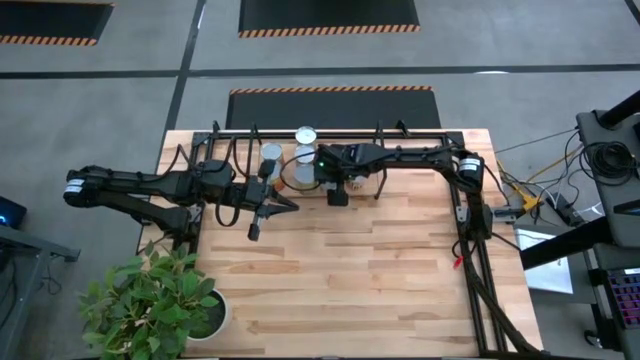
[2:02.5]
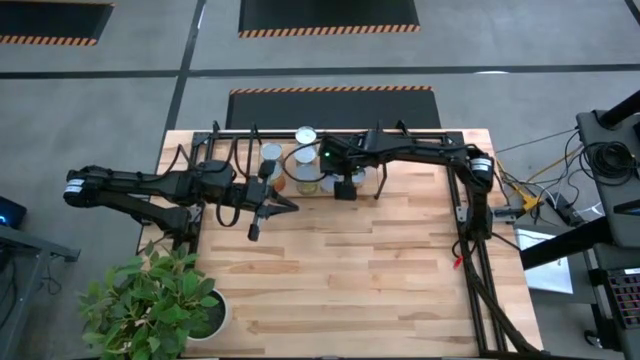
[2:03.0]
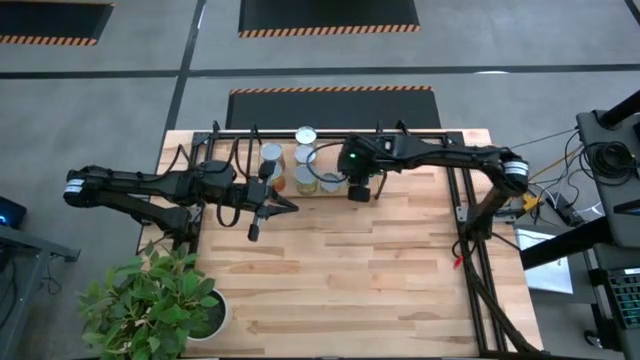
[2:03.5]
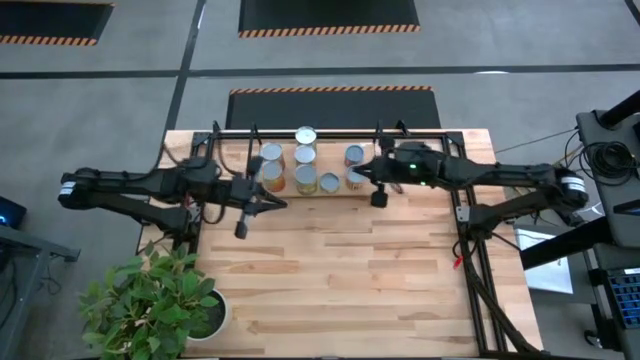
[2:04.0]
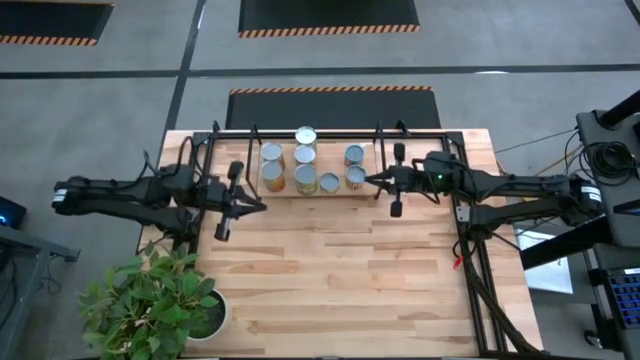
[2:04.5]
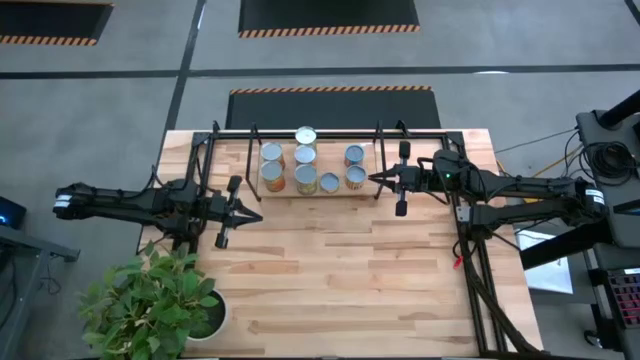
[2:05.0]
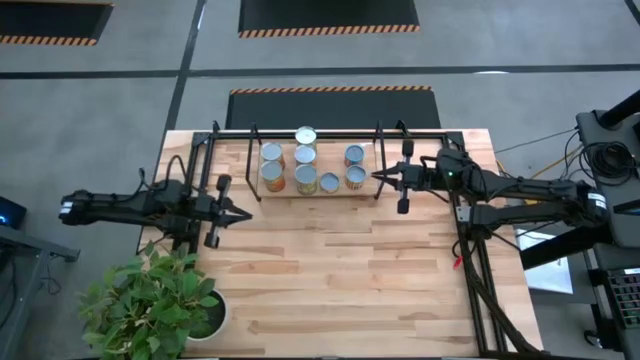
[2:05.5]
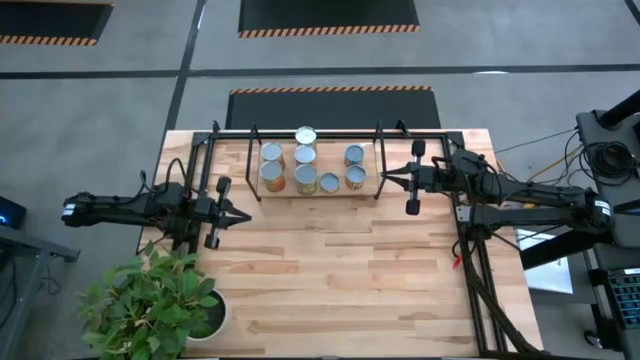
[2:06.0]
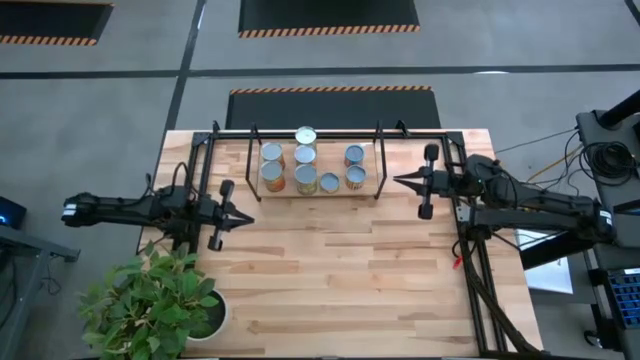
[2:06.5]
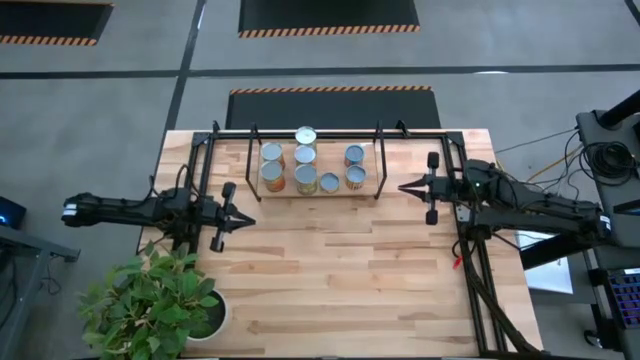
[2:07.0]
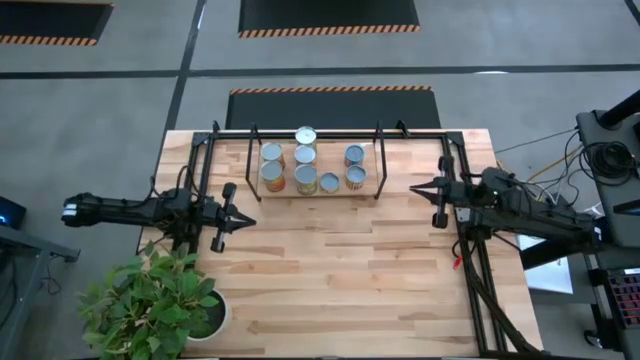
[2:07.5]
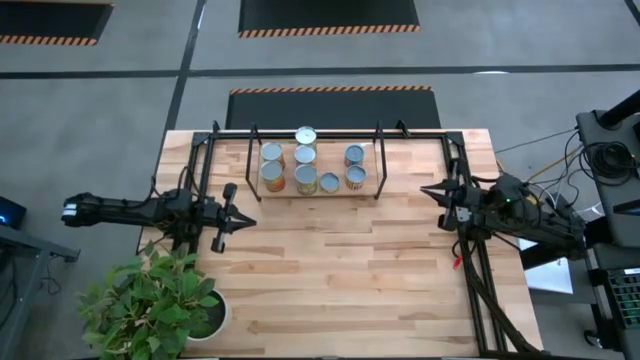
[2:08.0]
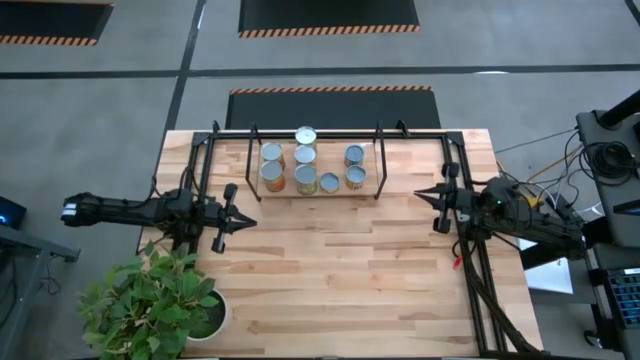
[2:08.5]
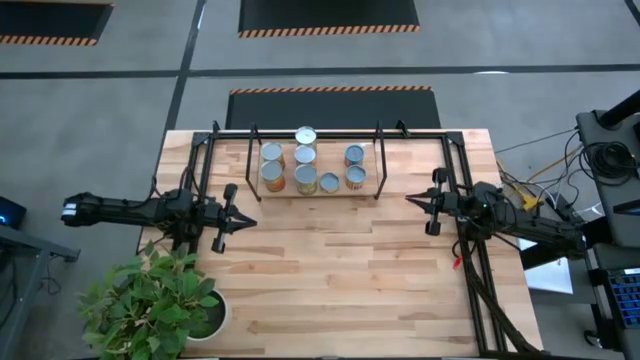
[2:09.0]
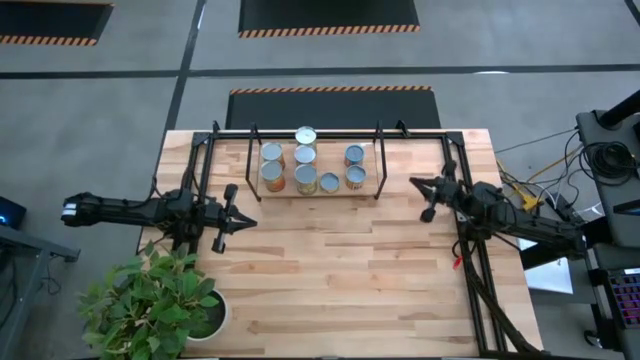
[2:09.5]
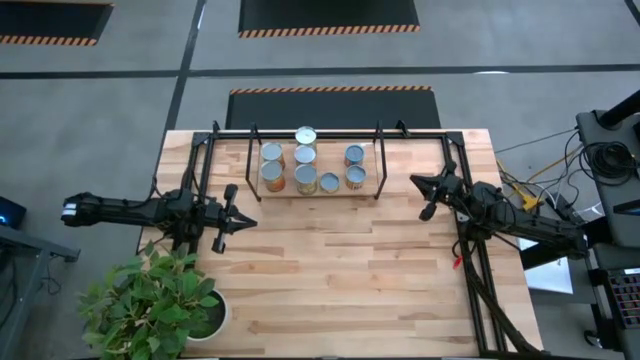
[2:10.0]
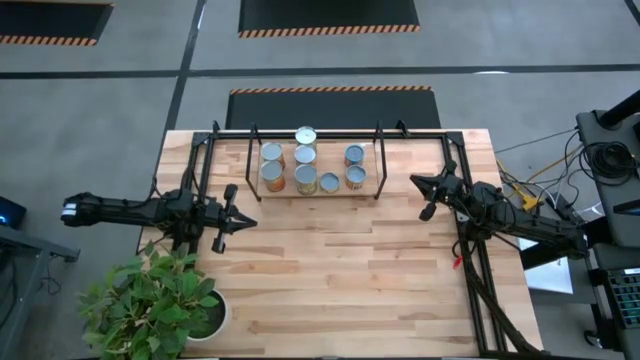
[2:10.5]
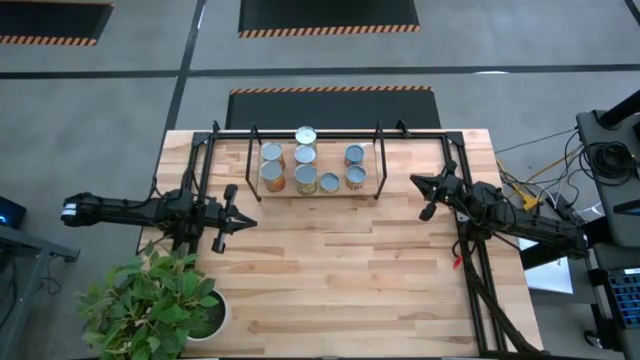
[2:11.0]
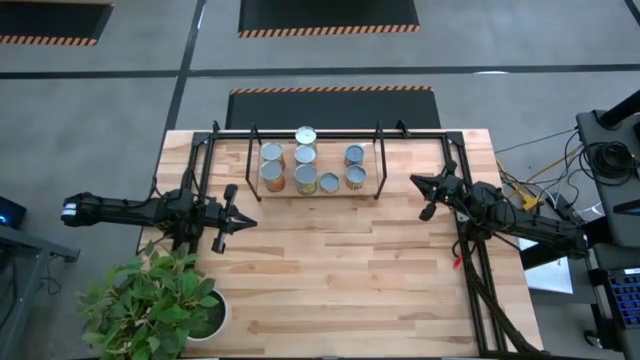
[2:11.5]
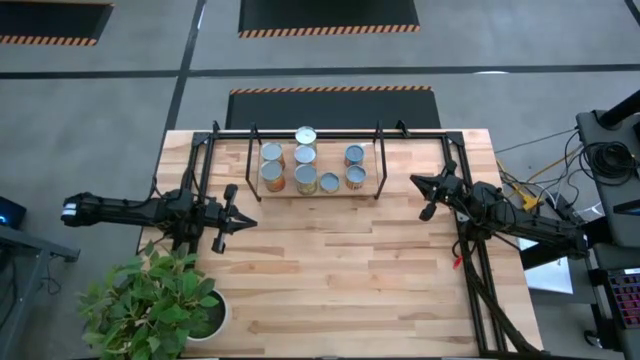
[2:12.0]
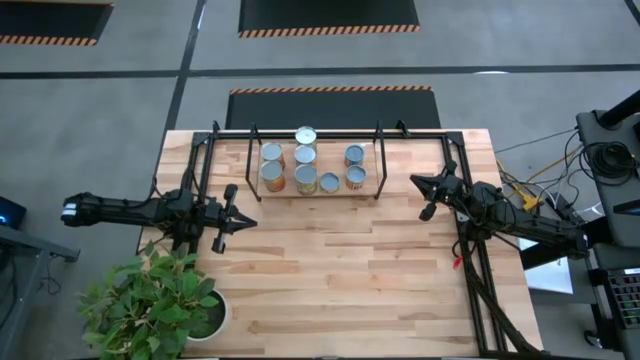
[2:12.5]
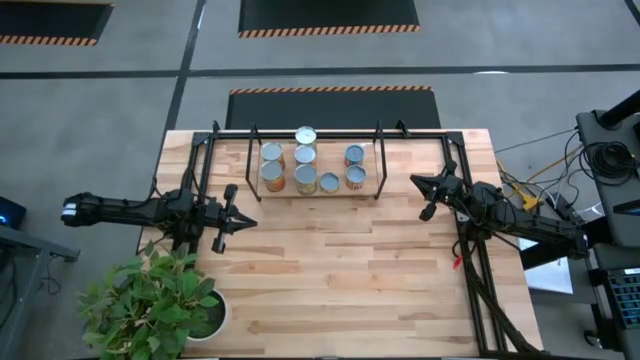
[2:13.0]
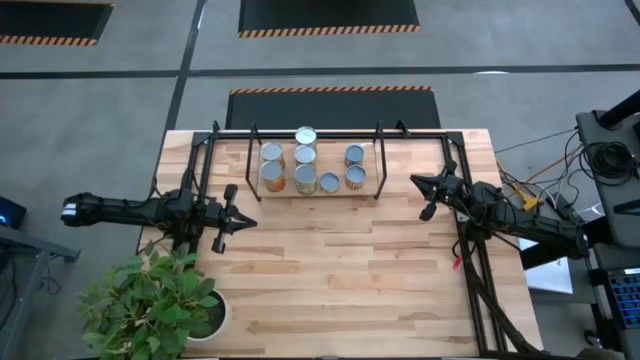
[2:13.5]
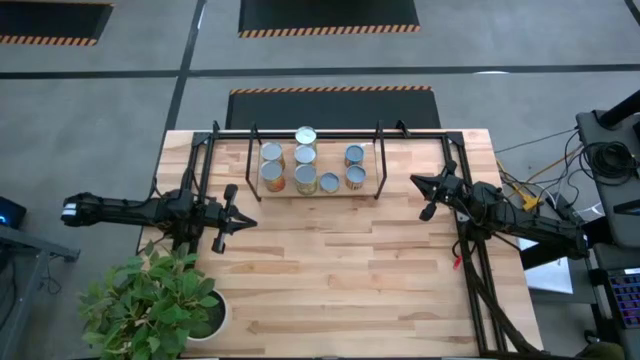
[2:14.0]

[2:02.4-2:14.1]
Task: Pick and place cans onto a shelf
Return to Home Position

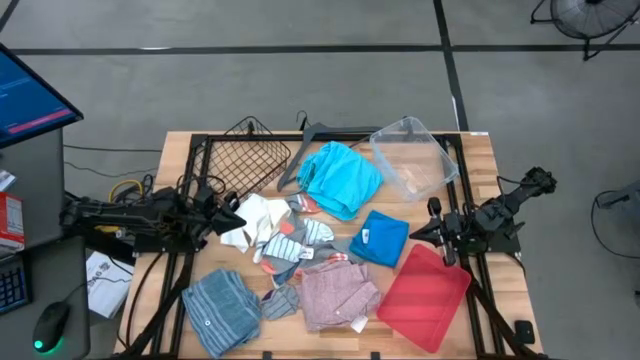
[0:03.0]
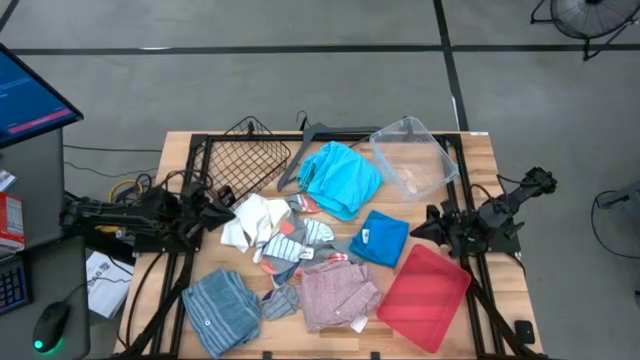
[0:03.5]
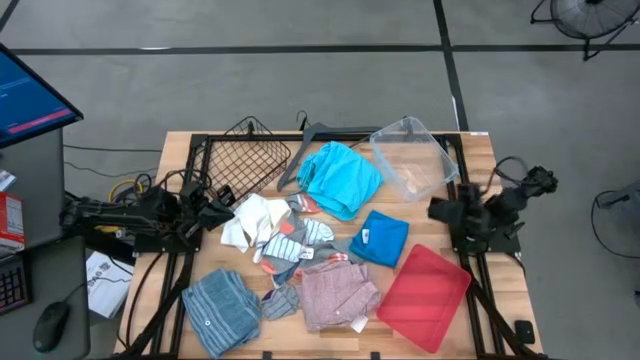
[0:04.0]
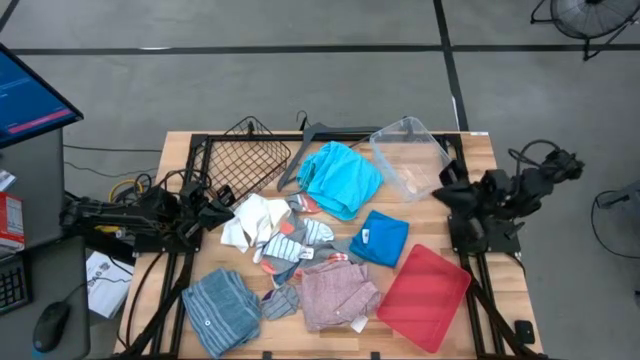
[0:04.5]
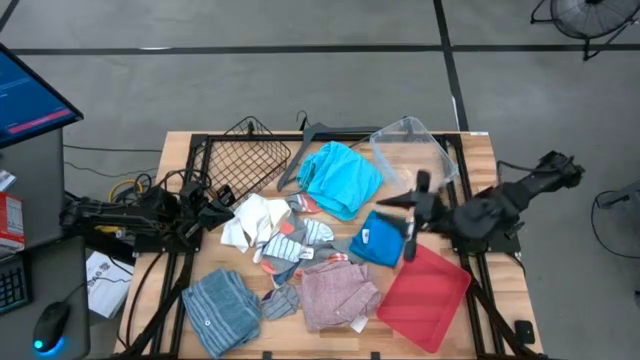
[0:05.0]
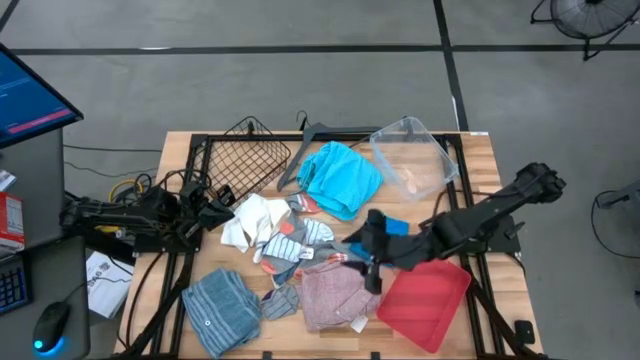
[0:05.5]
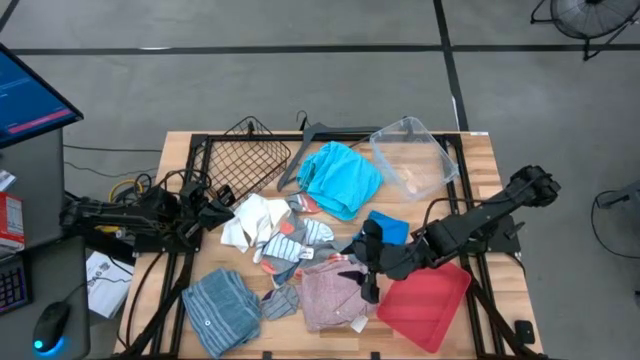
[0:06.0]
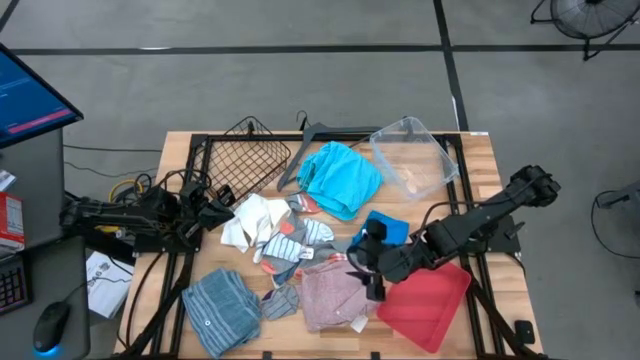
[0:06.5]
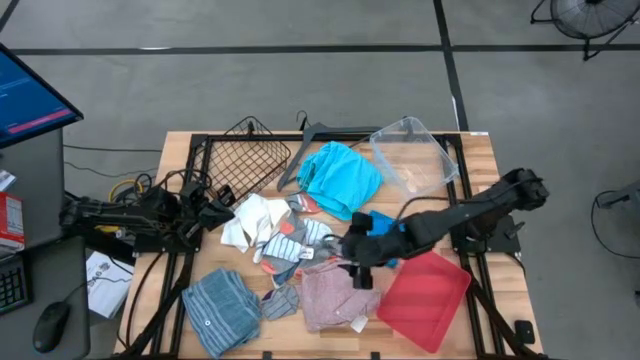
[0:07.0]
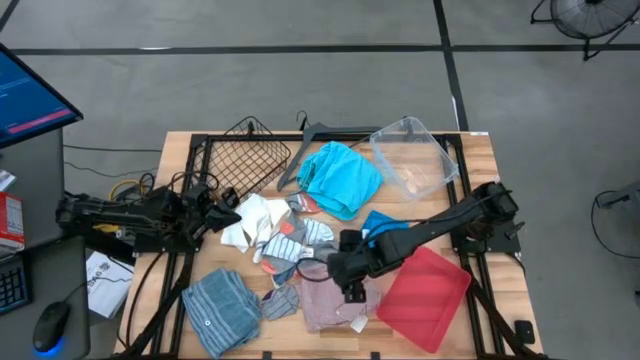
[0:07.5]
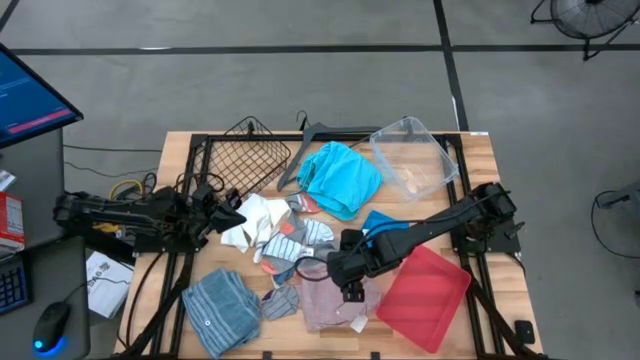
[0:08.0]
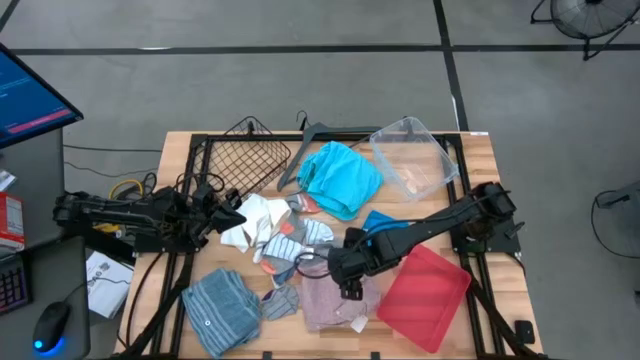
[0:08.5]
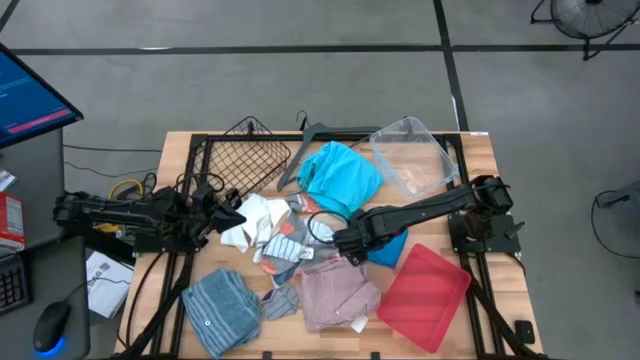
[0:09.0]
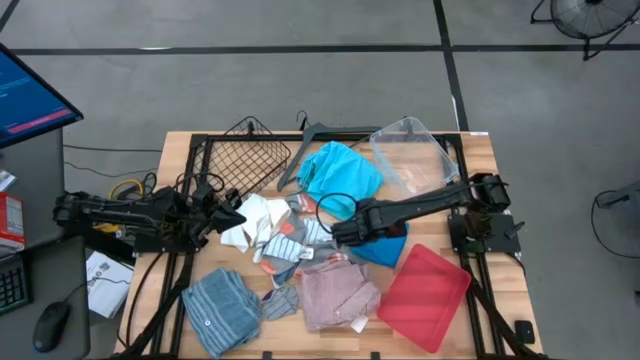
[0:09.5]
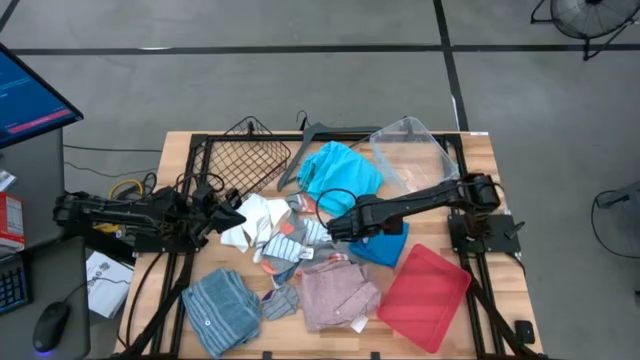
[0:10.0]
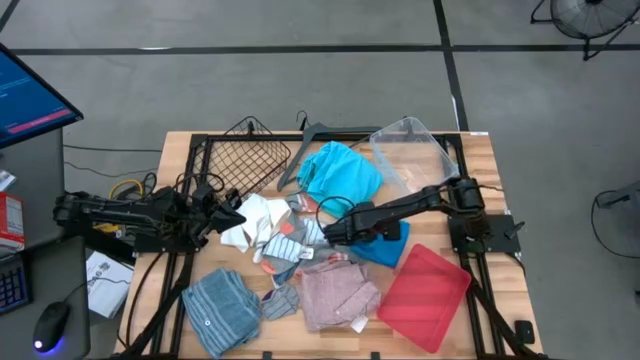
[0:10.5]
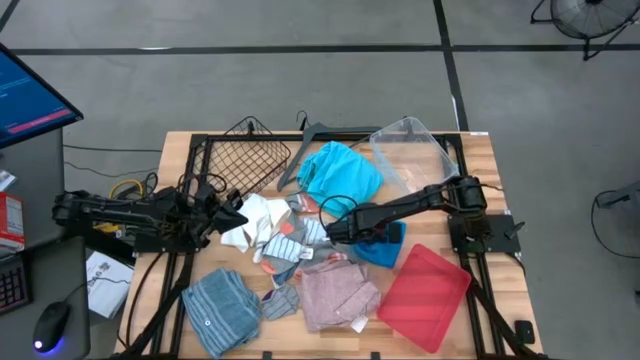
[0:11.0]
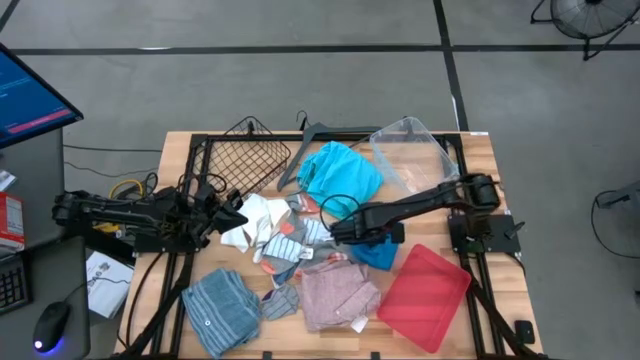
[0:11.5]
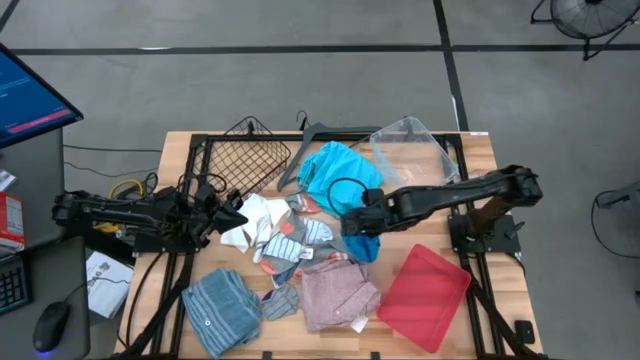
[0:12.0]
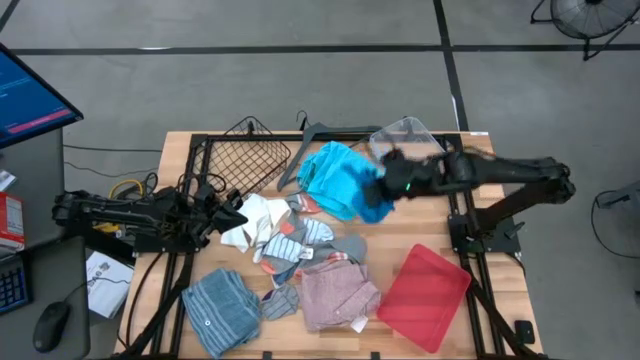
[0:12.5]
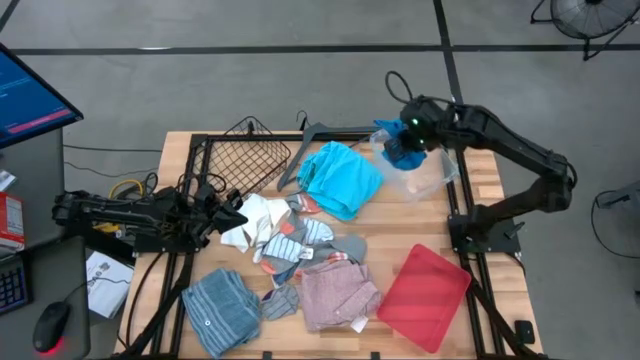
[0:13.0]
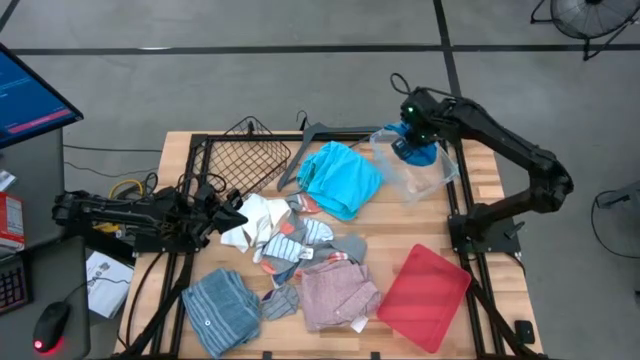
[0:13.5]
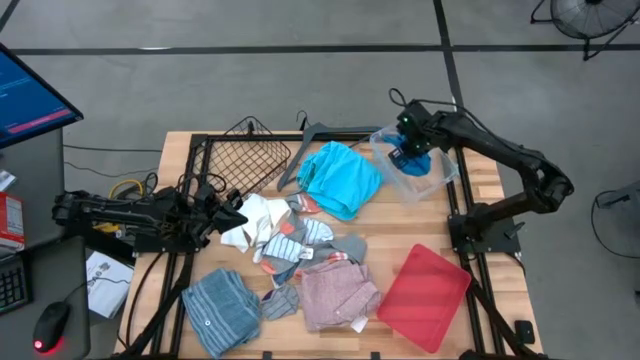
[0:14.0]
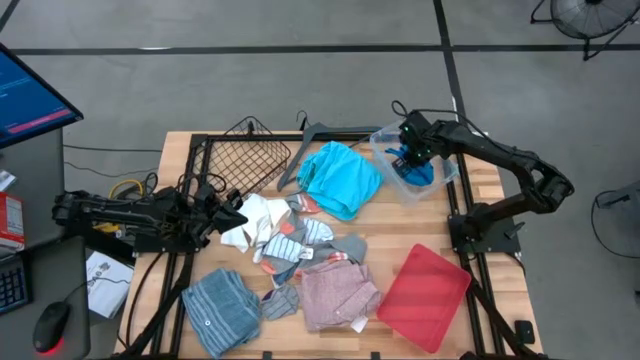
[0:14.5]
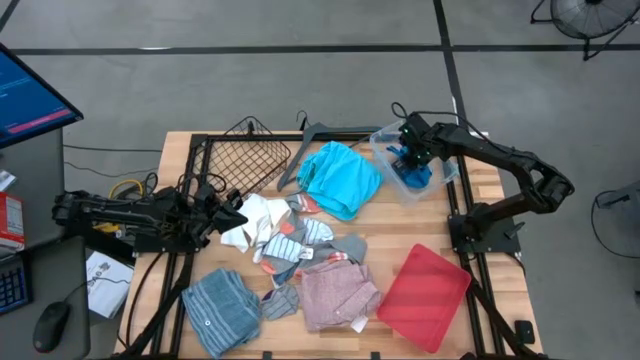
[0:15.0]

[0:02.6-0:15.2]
Task: Pick & Place Cloths
Put the blue shorts into the transparent bin
